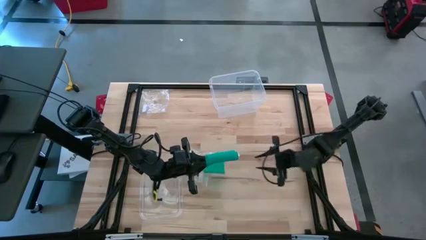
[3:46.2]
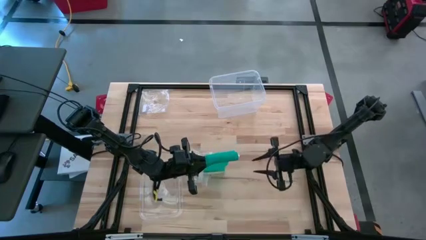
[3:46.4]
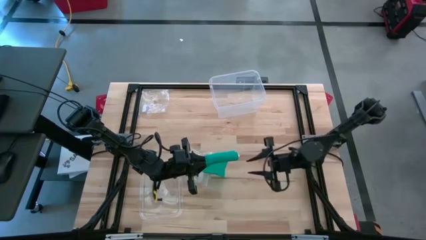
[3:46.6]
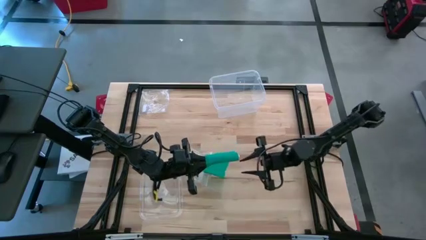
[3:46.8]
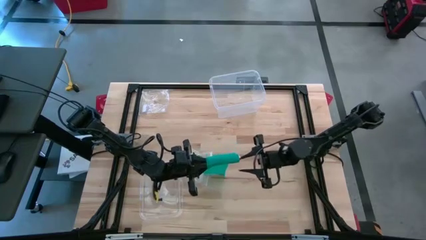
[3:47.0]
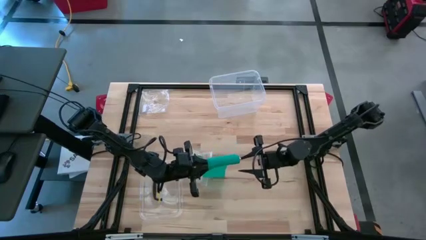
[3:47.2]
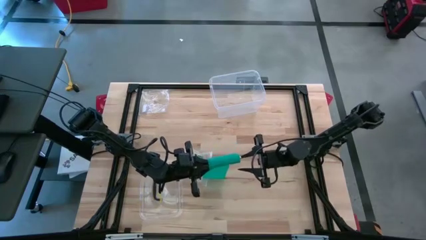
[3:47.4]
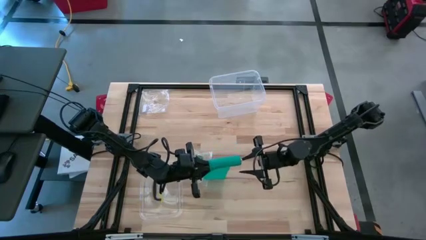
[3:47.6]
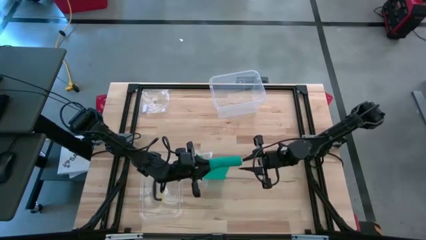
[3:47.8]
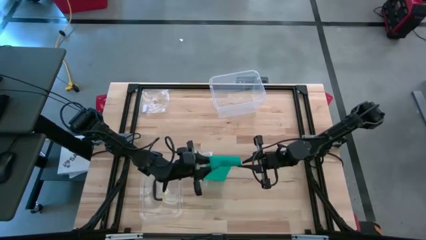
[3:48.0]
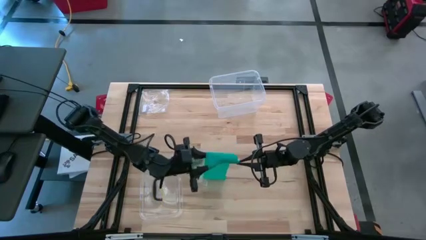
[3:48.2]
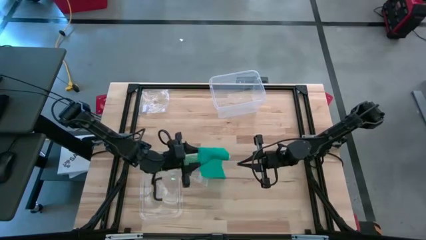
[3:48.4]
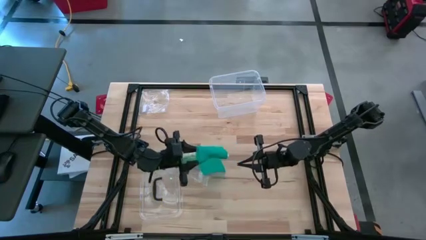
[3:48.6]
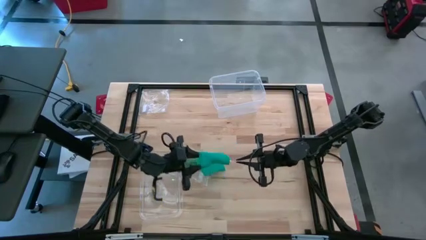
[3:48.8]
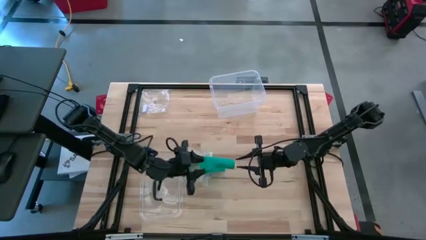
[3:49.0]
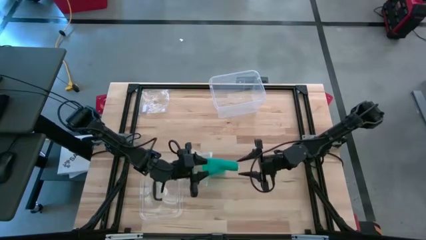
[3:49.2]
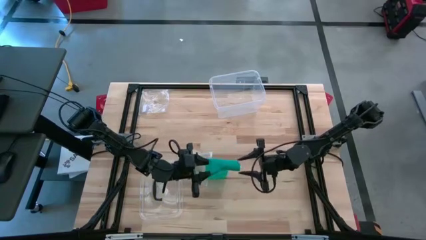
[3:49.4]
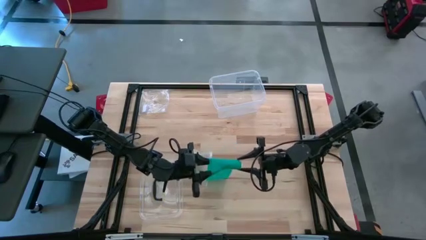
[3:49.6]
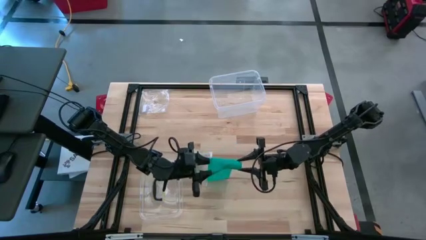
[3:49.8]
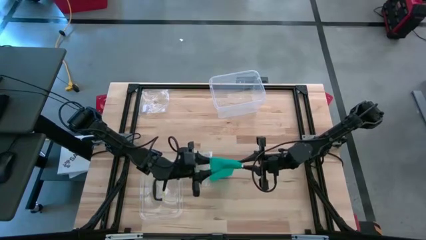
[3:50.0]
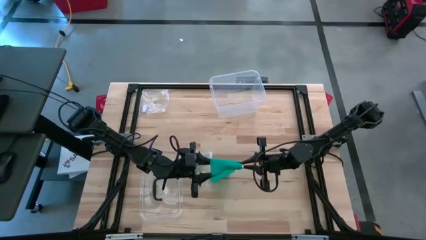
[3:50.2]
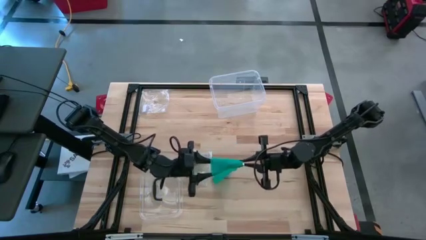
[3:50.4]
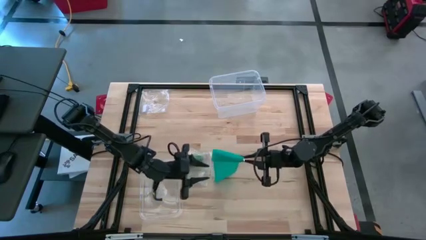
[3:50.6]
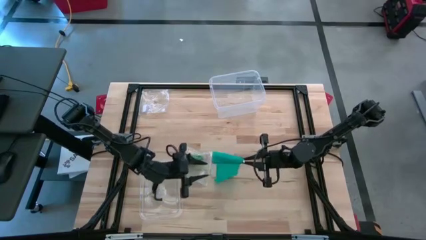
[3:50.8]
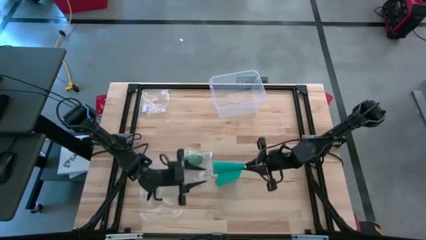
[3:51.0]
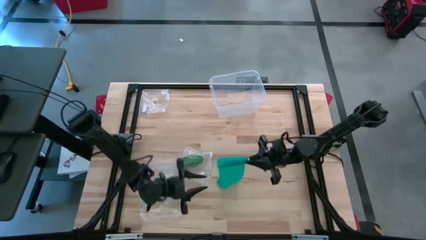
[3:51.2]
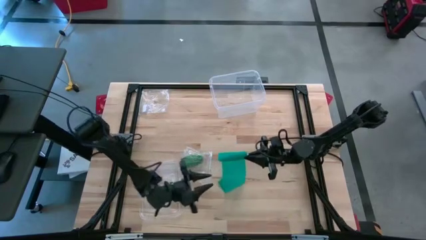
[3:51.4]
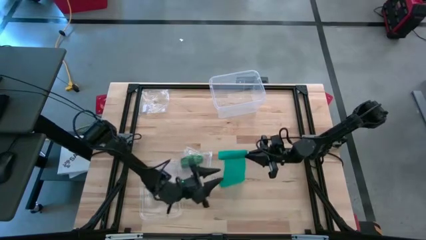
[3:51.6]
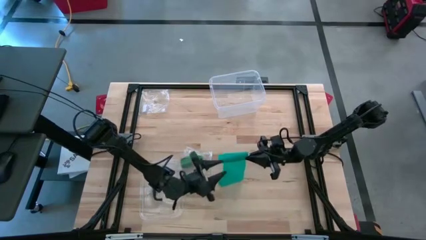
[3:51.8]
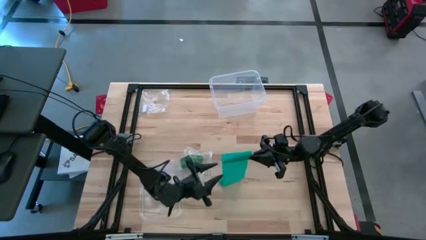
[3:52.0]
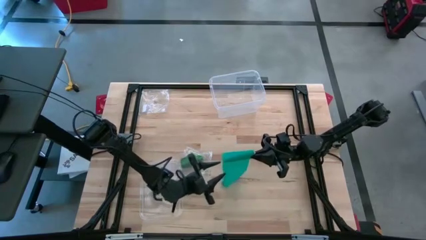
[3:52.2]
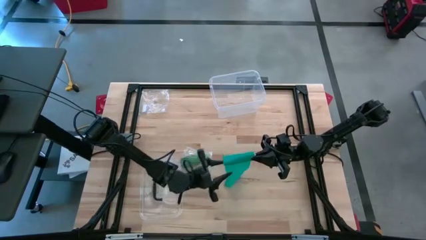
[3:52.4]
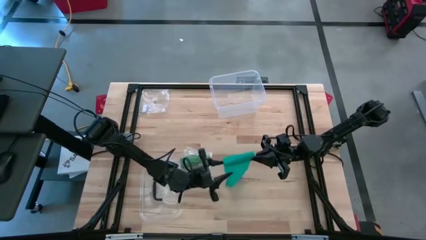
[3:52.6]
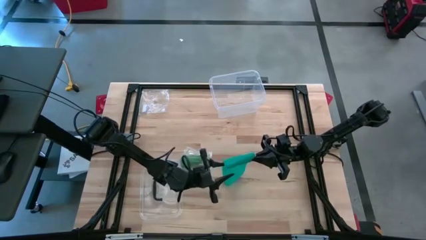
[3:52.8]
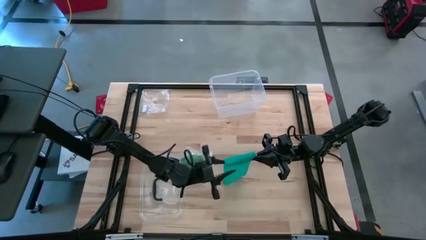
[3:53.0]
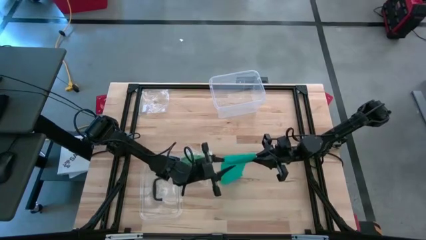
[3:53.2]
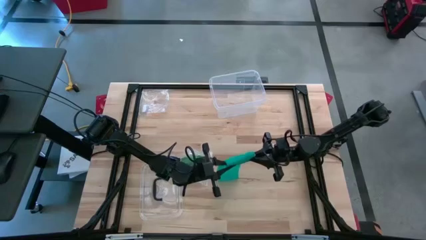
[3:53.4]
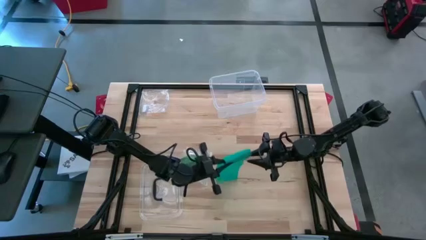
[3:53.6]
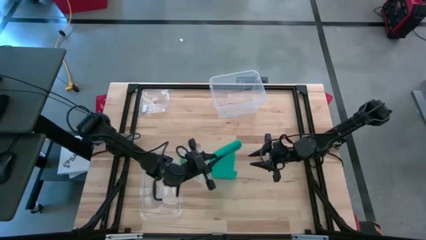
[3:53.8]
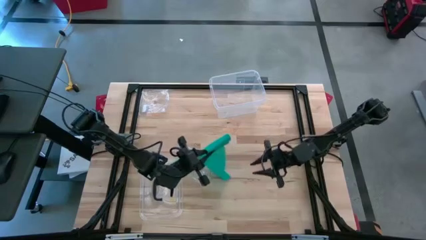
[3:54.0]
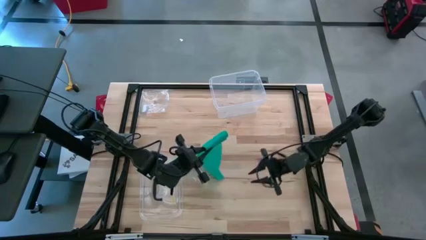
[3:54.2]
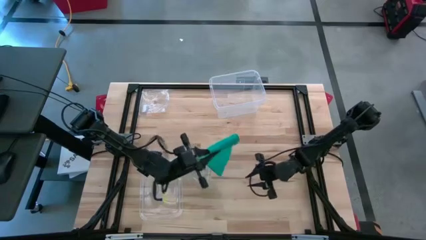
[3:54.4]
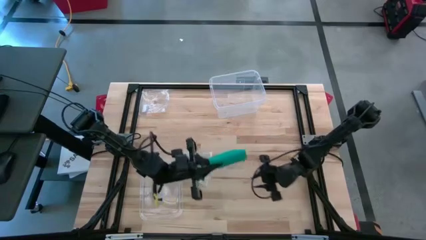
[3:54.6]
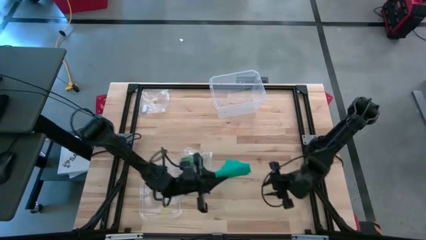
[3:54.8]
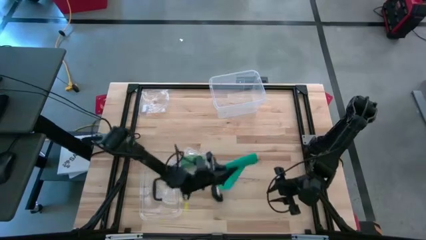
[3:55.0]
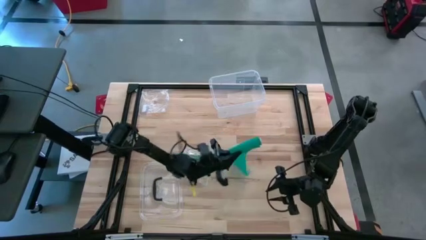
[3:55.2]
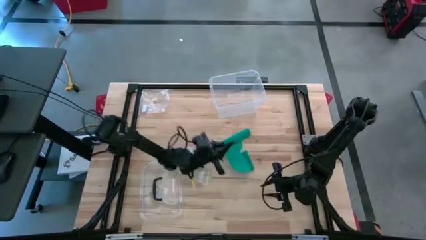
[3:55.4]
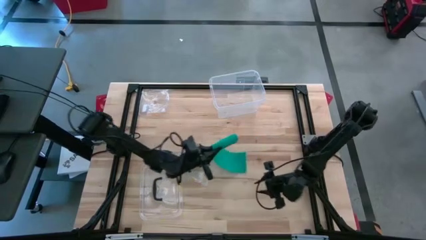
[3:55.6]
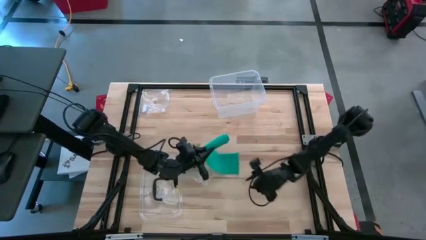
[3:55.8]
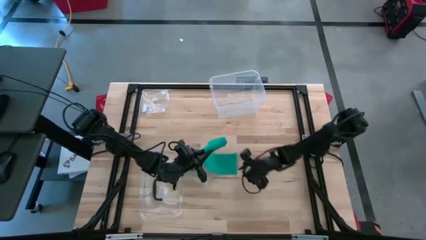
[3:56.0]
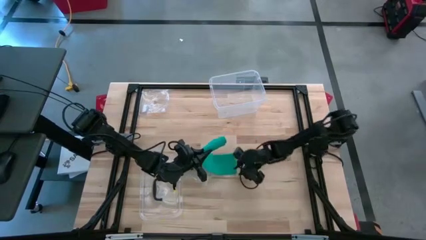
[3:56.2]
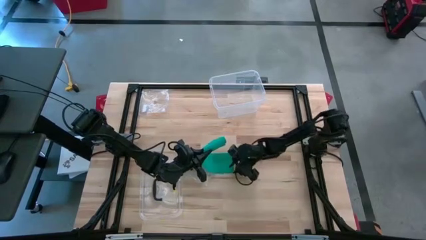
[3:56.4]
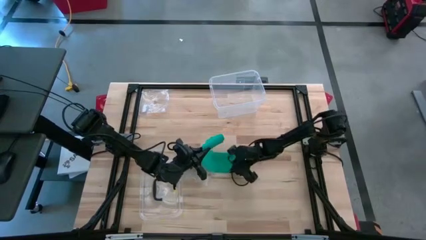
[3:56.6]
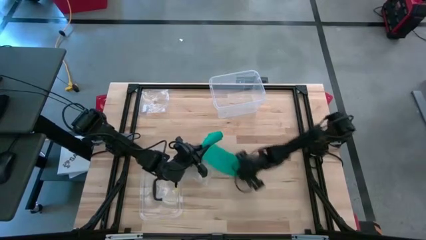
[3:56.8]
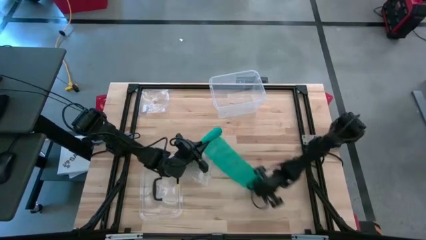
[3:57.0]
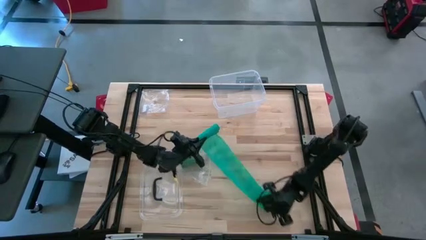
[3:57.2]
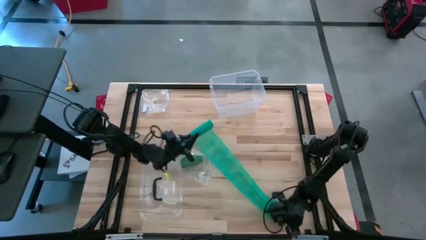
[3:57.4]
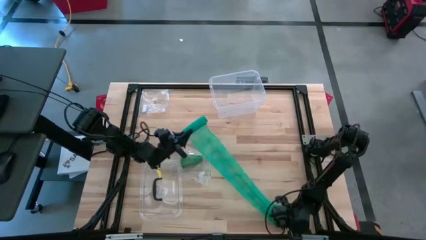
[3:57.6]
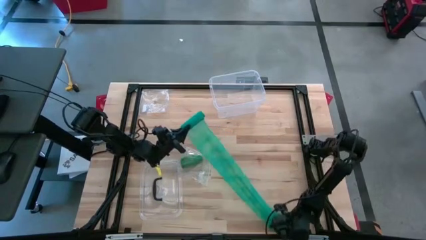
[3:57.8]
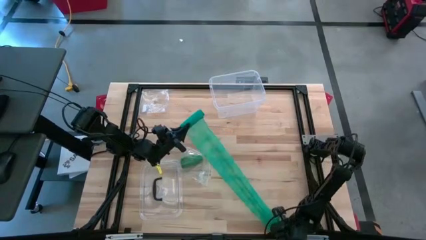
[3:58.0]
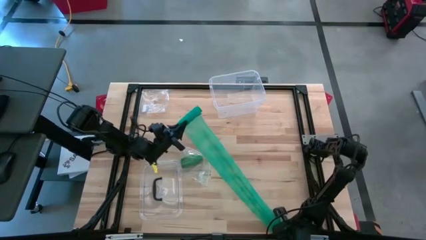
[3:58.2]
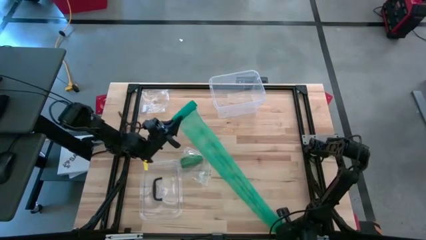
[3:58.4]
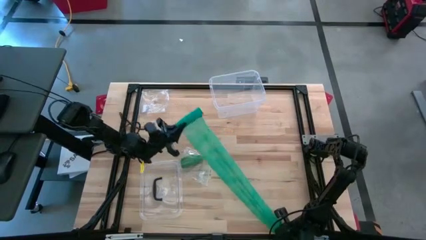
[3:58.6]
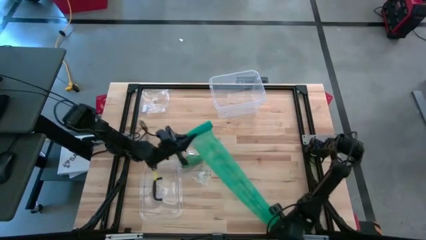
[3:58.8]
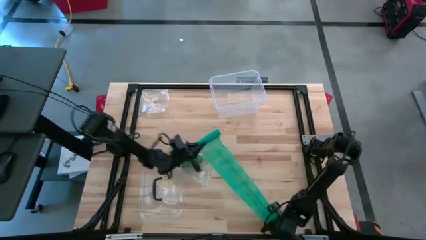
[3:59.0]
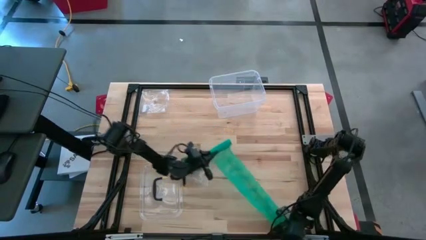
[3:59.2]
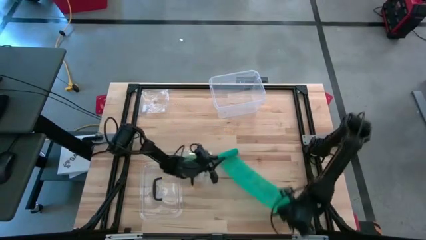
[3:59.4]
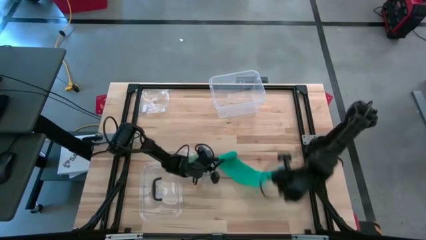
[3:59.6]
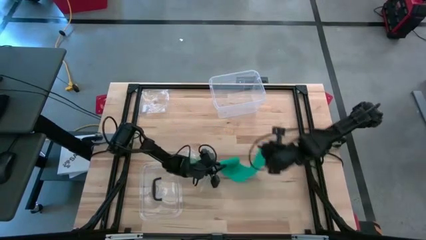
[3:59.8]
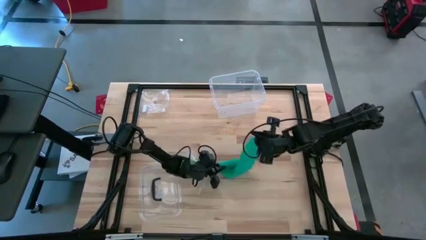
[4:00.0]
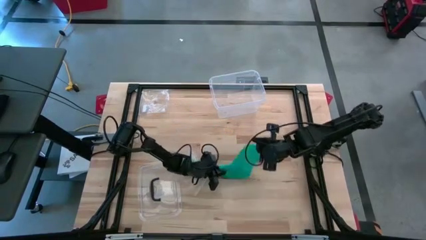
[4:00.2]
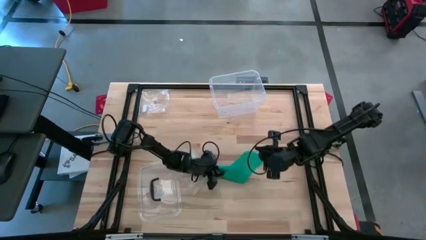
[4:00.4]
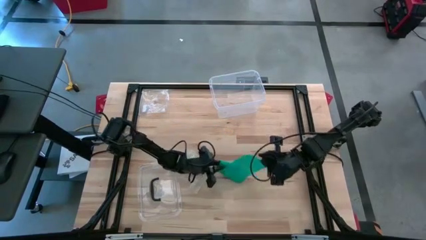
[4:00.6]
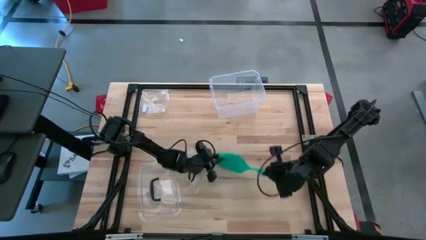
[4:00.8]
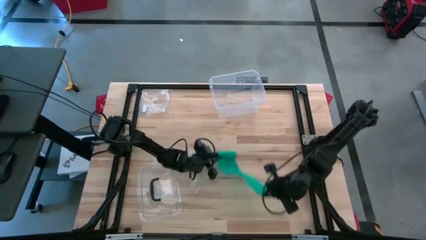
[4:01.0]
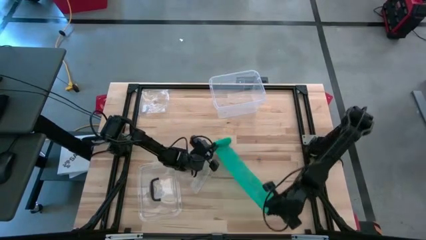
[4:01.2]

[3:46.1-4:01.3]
Task: Roll bandage
Roll the blue bandage

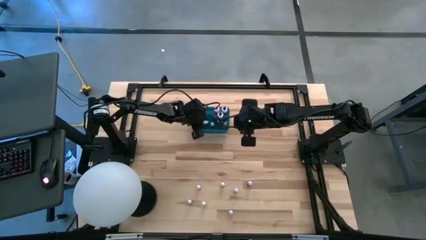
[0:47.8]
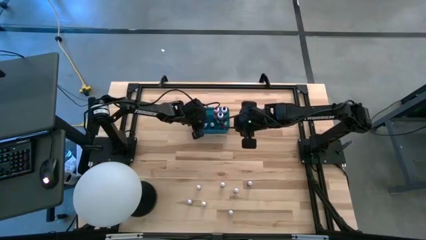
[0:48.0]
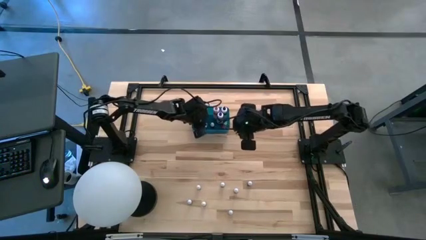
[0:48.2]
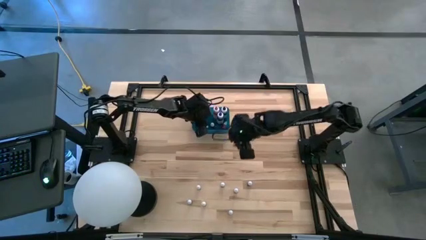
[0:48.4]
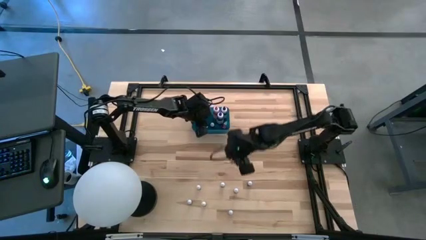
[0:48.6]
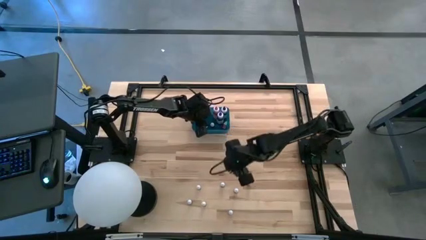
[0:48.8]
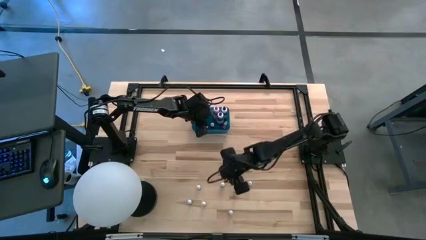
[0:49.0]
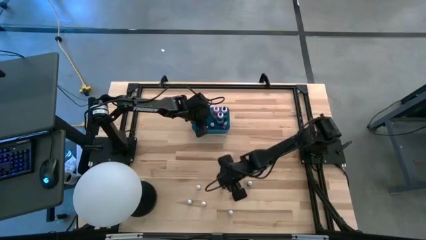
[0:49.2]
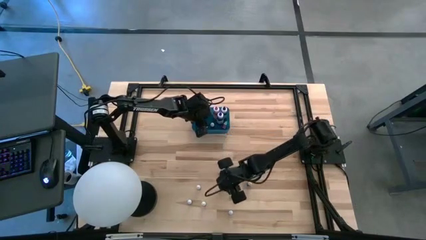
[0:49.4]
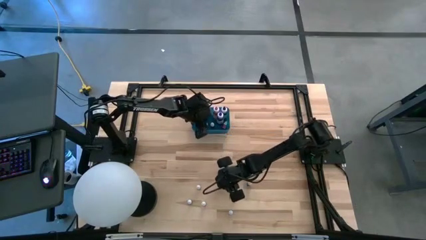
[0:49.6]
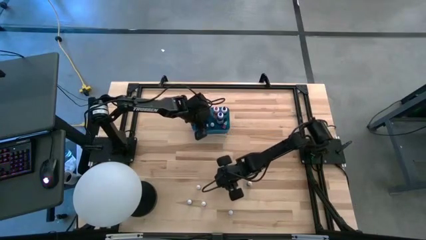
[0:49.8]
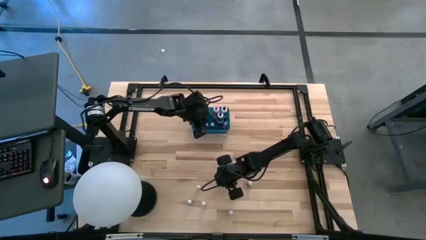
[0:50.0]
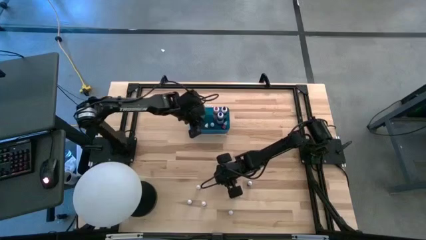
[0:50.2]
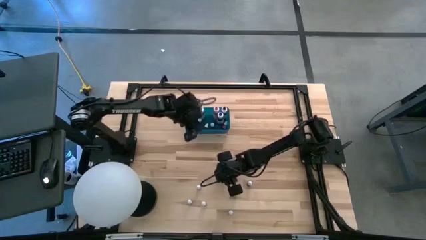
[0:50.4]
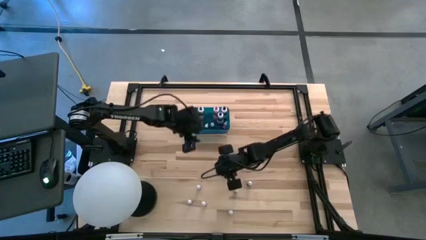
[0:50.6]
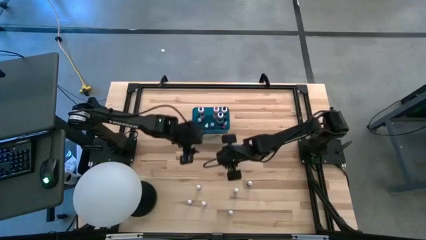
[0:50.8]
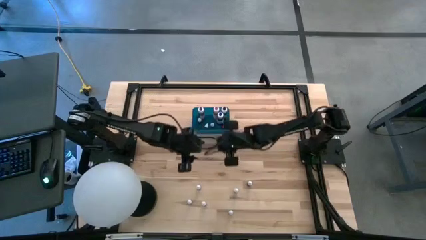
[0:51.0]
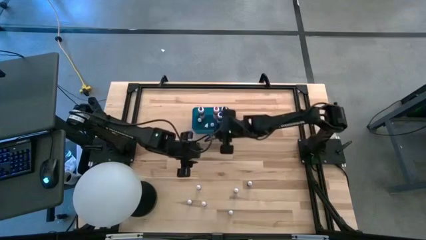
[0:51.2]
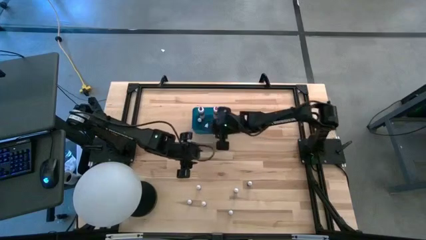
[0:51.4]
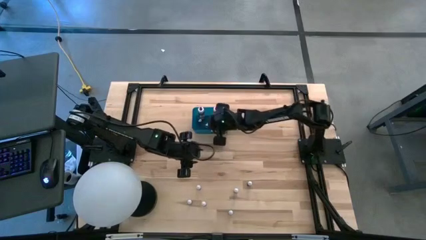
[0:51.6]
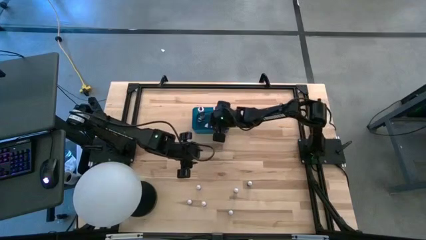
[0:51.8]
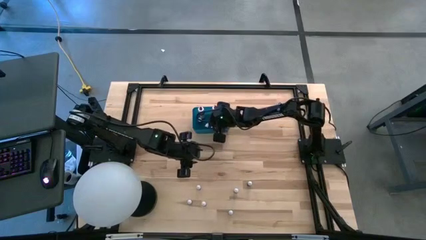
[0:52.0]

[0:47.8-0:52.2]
Task: Pick & Place food coloring
Put the green food coloring bottle into the blue bin
